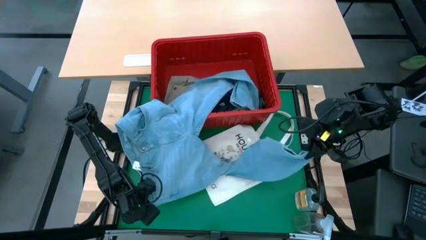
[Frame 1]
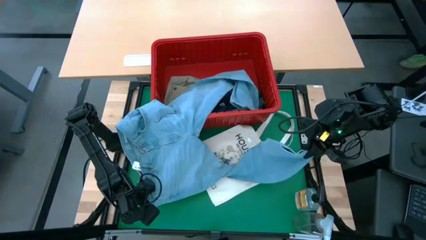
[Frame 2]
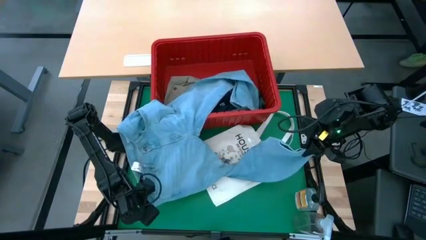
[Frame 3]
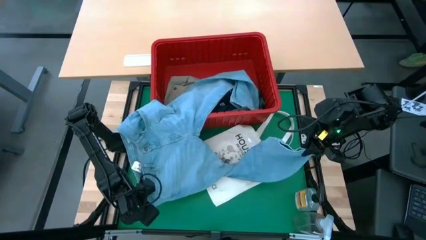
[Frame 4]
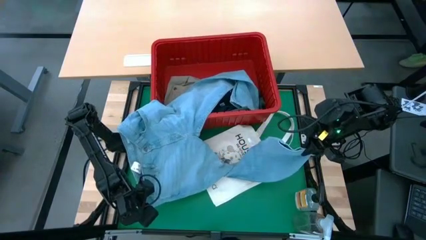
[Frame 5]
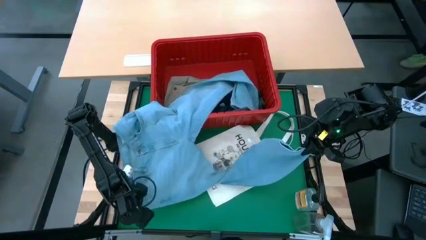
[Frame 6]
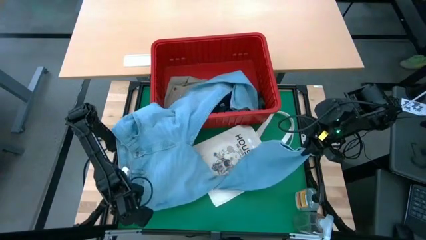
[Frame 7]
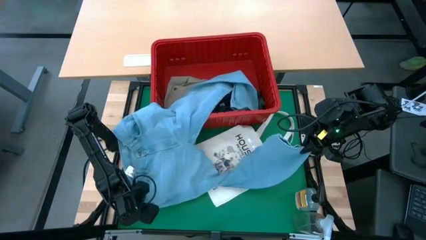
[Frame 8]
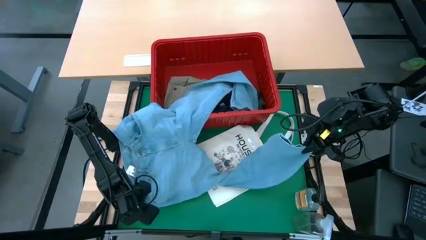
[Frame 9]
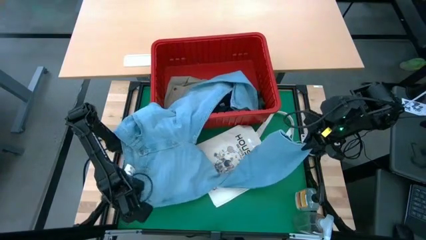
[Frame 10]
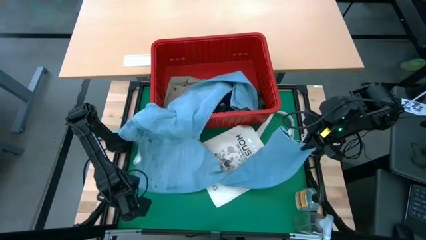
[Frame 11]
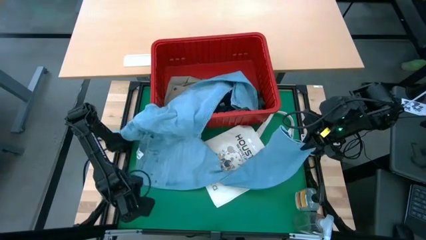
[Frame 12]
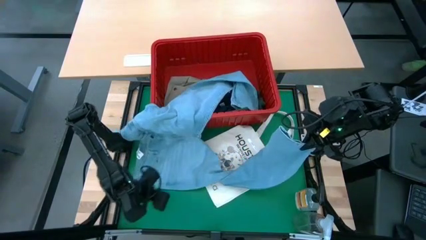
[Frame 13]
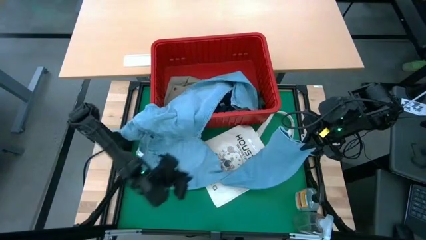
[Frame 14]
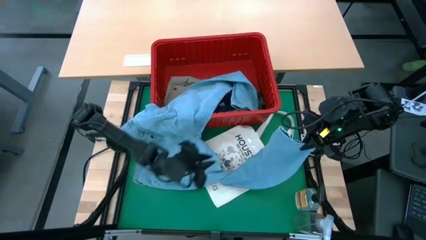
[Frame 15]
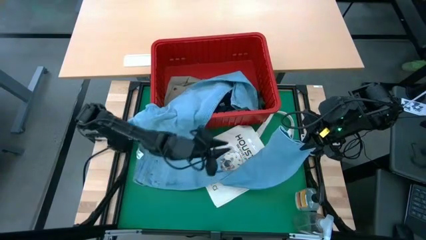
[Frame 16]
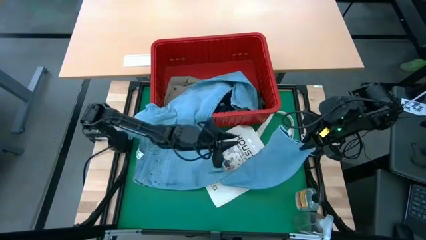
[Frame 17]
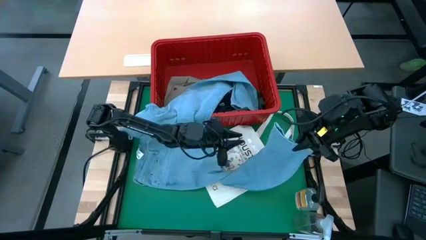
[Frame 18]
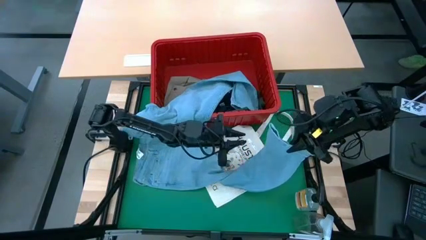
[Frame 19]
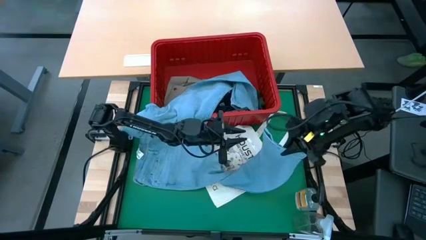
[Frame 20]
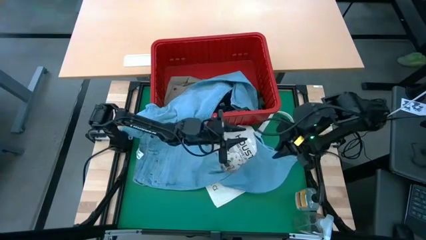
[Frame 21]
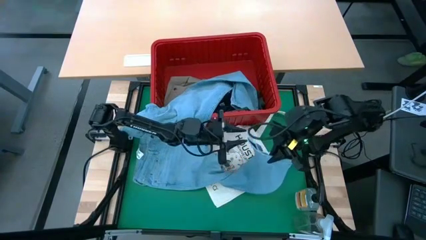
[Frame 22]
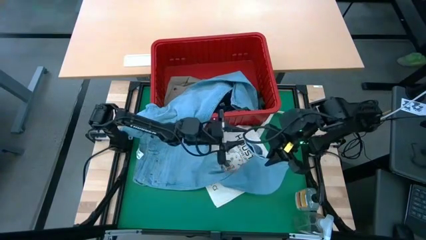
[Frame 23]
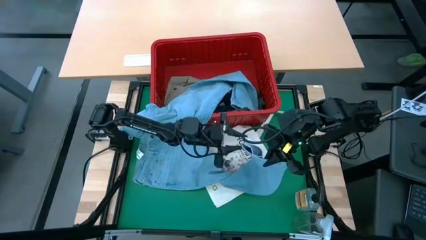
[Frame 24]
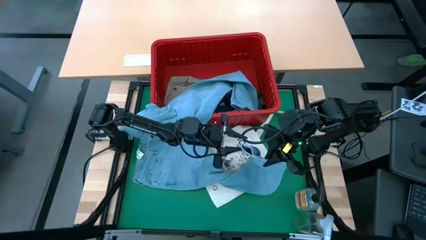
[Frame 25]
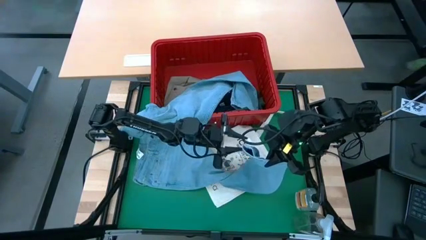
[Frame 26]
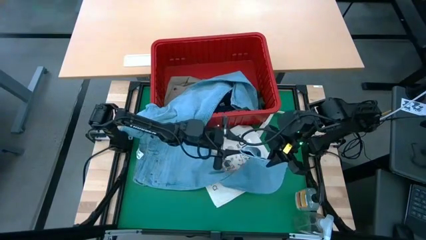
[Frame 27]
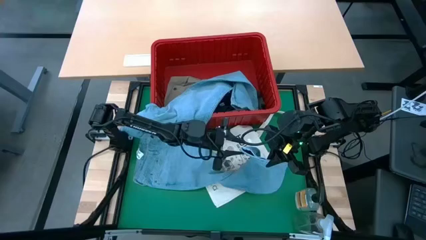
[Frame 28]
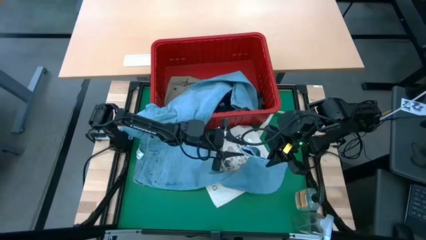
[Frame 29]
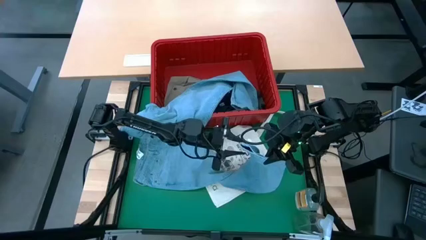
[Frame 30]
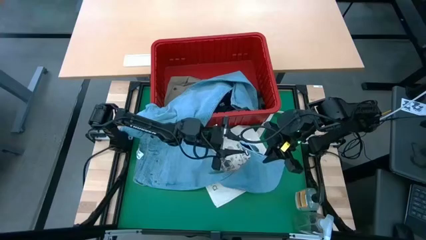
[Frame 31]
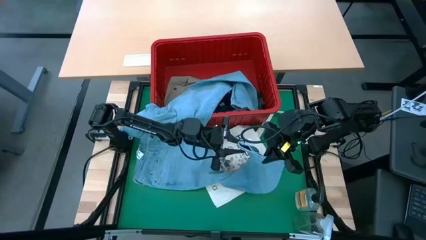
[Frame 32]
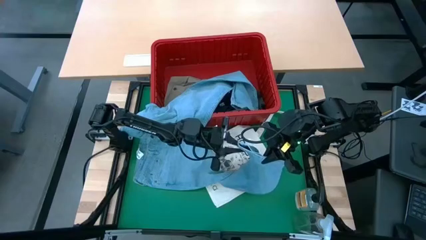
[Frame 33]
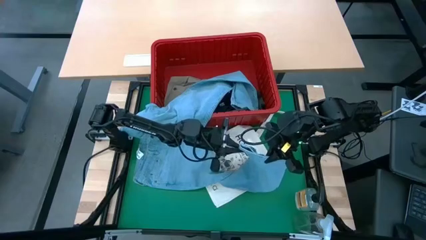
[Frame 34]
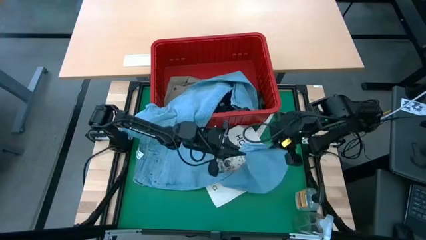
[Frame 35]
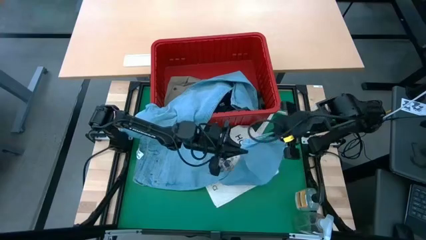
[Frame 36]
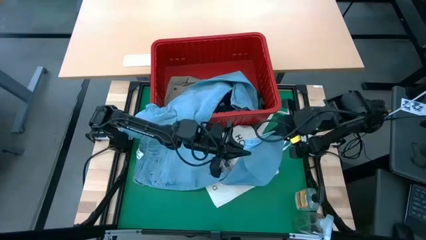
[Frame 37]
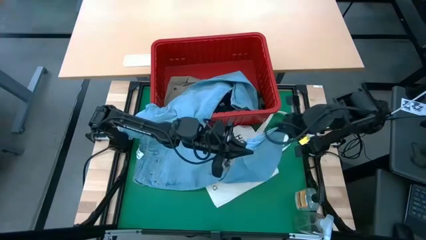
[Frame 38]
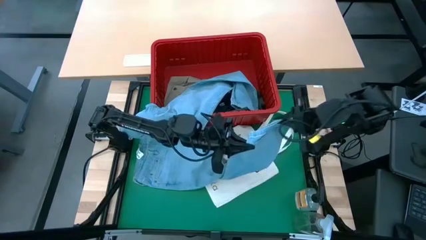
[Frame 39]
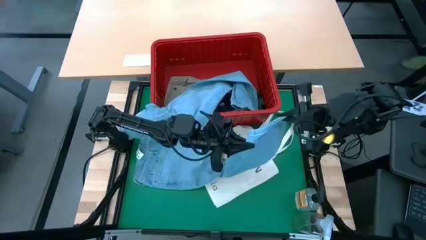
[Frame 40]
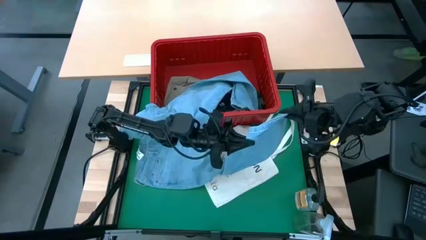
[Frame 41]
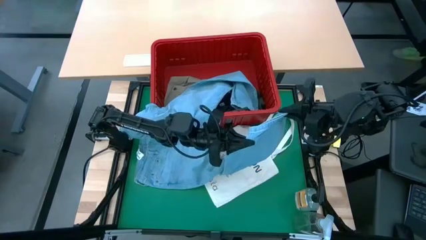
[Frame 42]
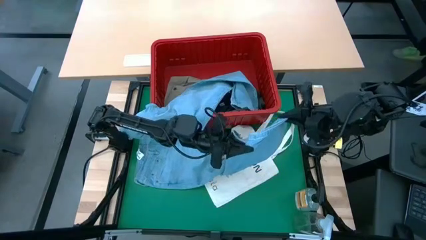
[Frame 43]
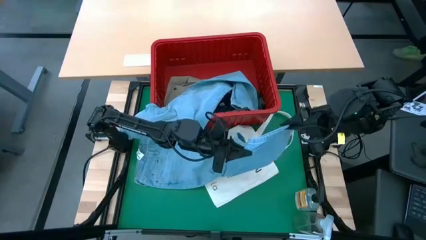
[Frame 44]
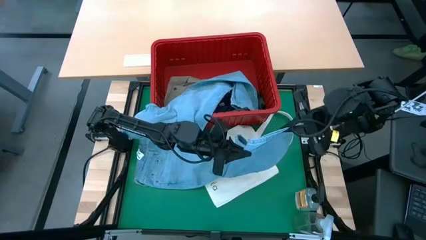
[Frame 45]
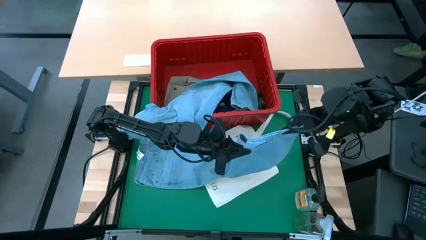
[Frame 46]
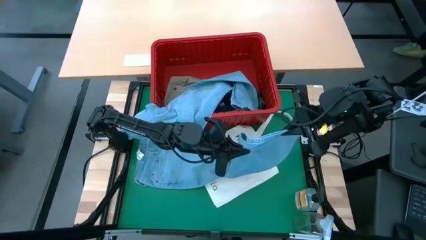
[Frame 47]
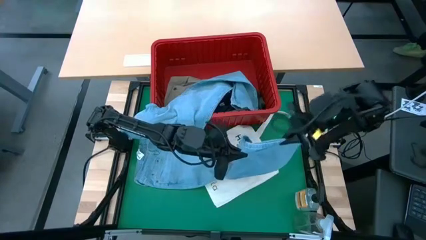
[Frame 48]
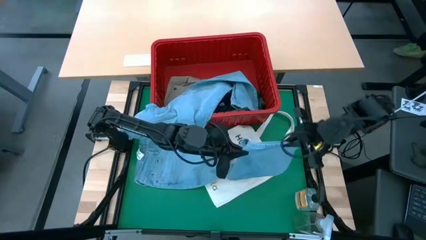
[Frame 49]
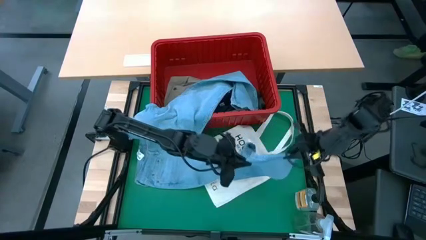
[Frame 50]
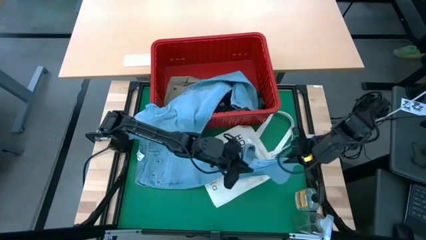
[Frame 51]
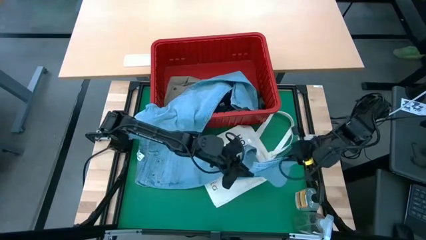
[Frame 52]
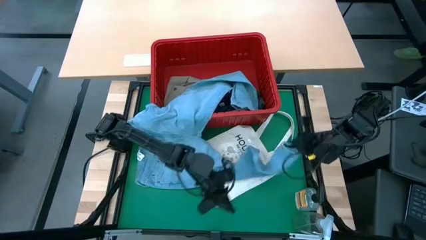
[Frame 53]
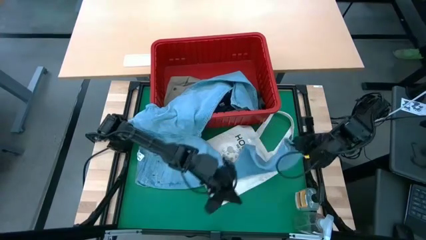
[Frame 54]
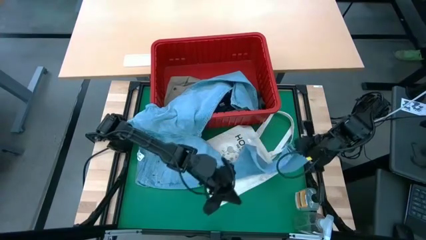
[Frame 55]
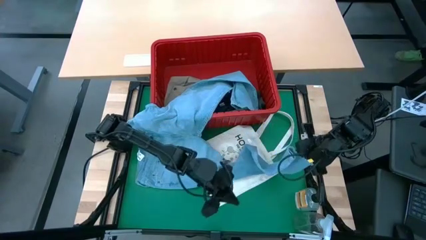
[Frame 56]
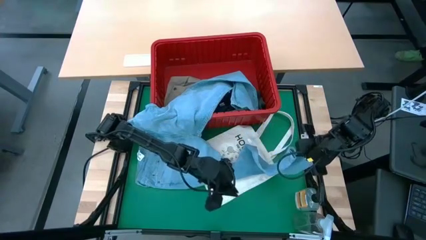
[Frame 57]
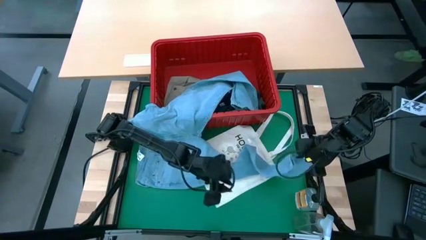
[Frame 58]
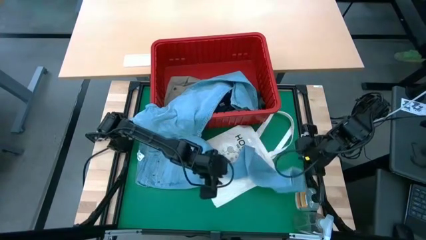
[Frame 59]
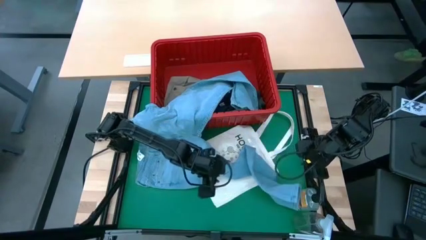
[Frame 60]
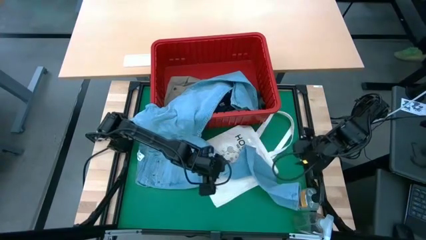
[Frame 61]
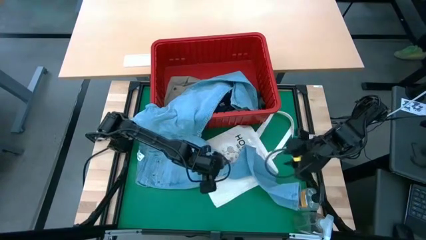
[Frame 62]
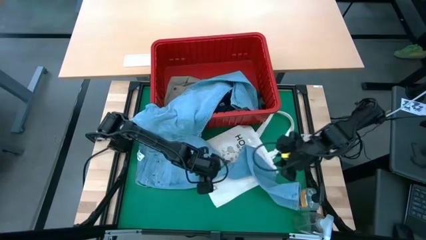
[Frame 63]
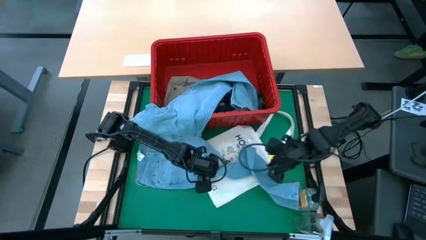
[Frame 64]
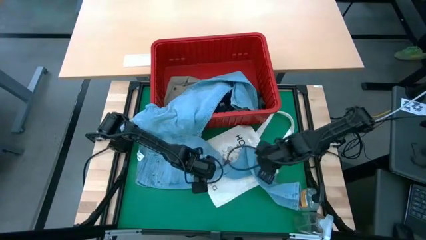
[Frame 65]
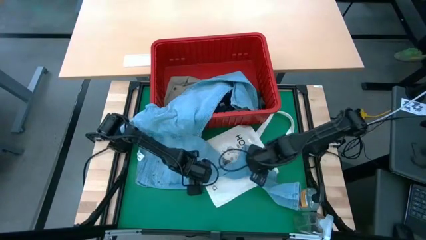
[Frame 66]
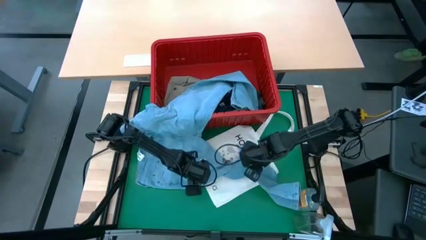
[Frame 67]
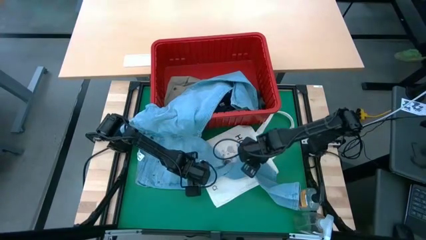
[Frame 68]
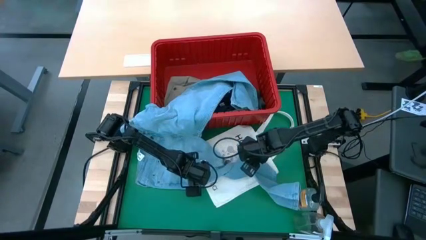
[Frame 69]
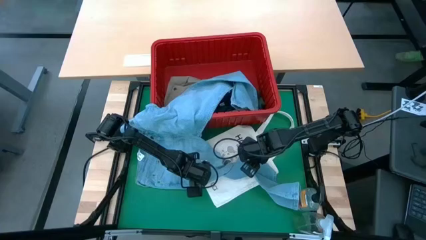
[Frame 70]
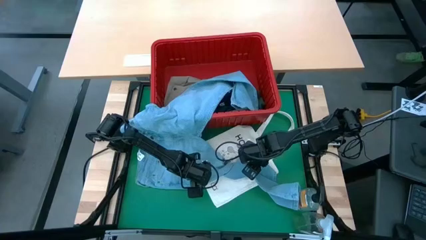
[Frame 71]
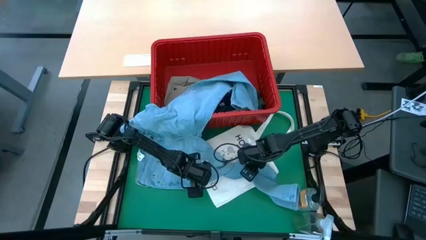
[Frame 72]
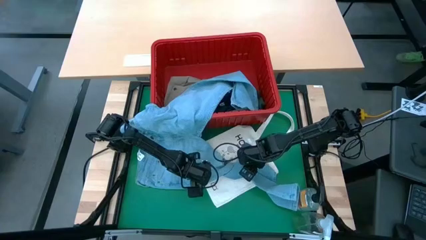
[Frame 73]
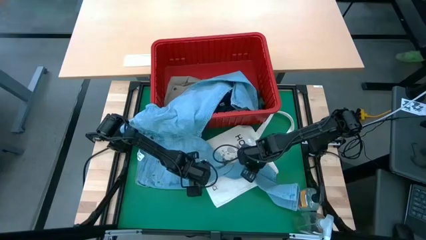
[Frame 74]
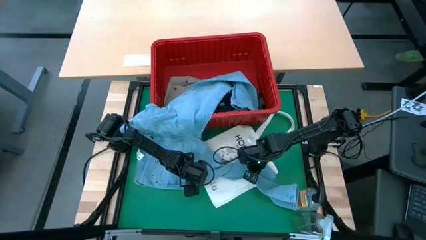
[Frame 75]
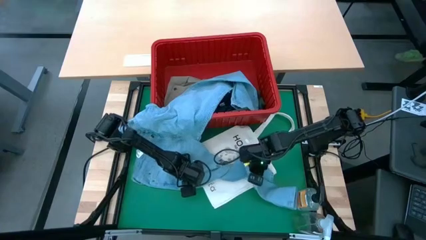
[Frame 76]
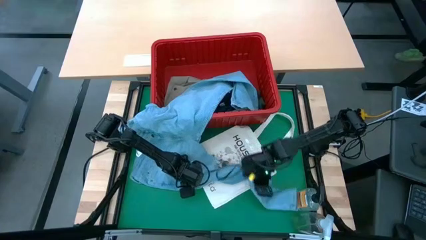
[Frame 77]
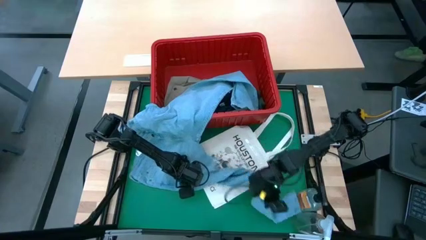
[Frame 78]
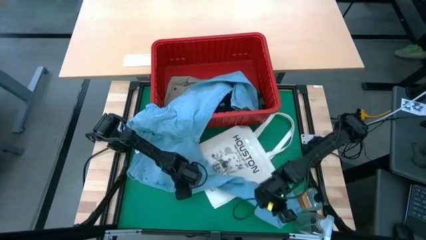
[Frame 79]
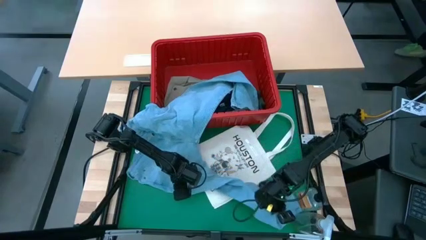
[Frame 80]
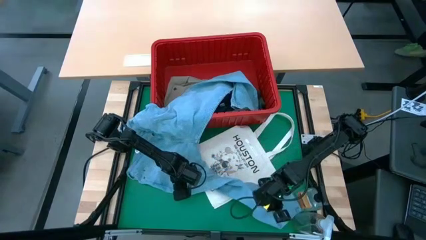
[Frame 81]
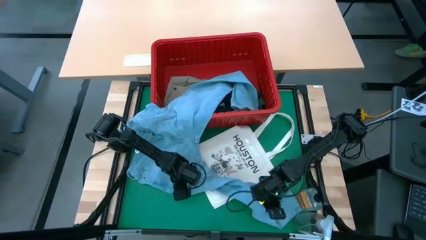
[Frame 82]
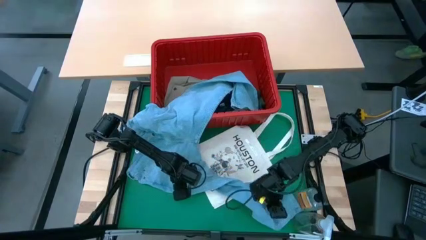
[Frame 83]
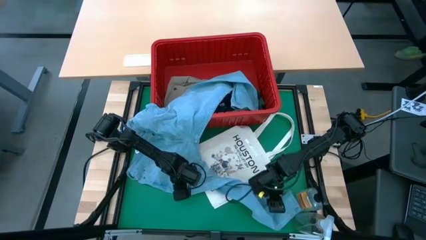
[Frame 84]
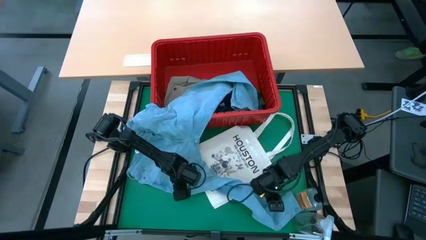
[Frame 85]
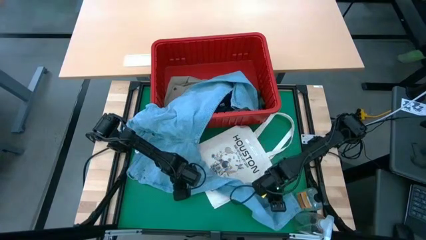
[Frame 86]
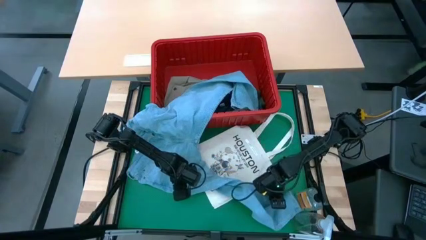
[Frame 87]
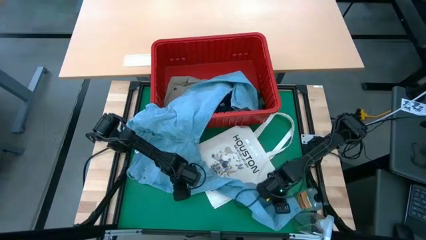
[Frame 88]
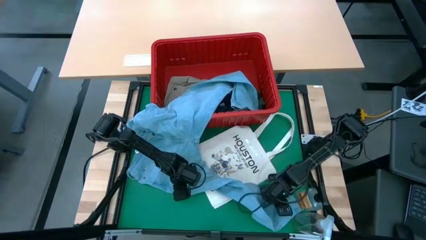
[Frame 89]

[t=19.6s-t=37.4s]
Task: Fold Laundry from Bin
Fold the blue jeans
